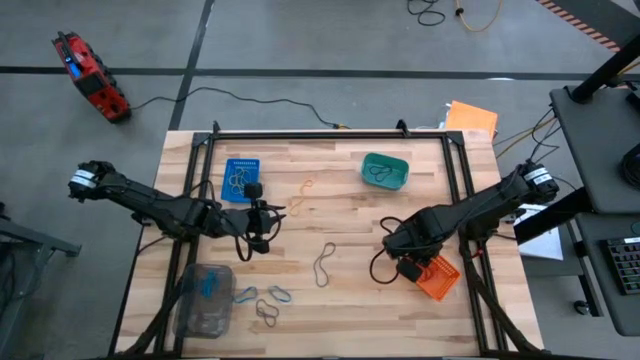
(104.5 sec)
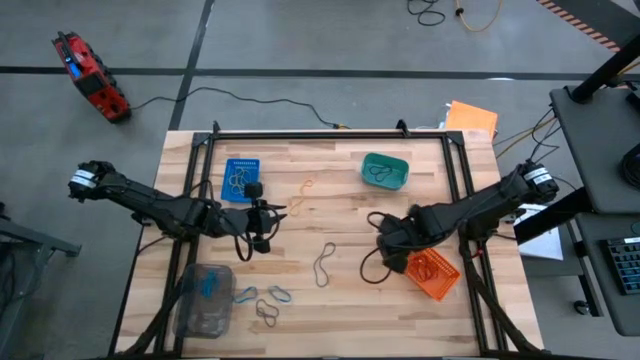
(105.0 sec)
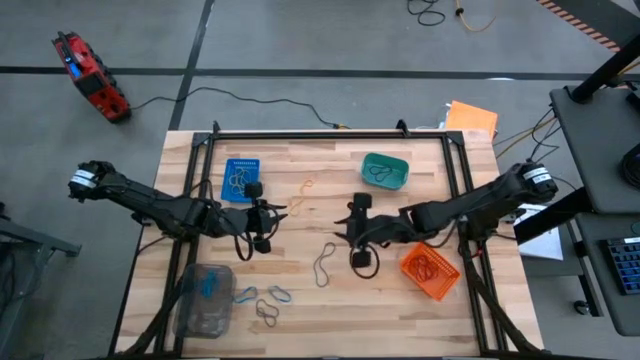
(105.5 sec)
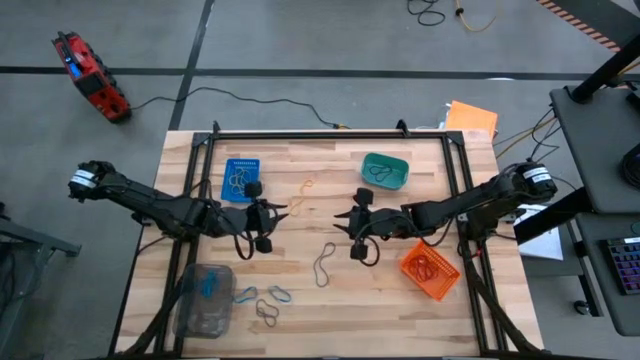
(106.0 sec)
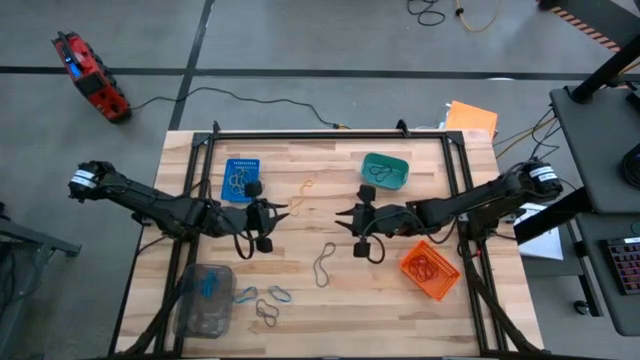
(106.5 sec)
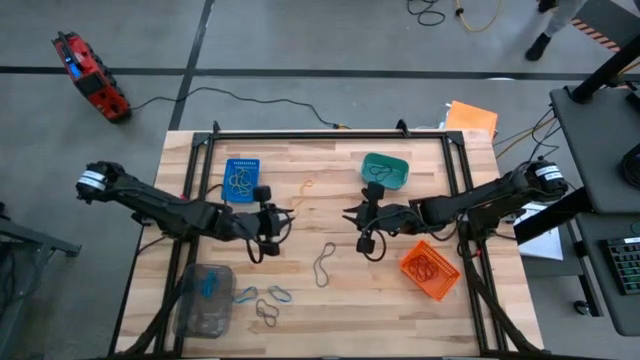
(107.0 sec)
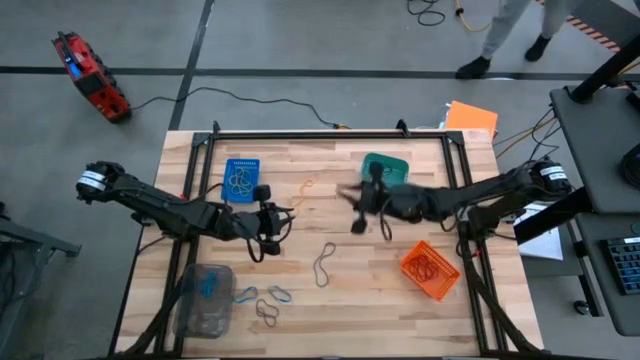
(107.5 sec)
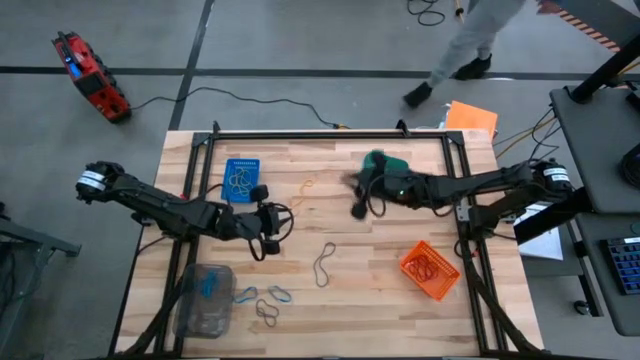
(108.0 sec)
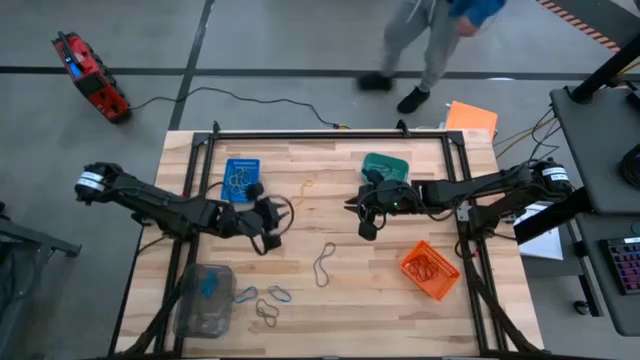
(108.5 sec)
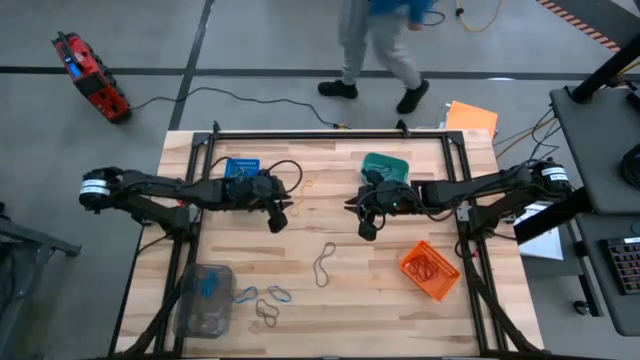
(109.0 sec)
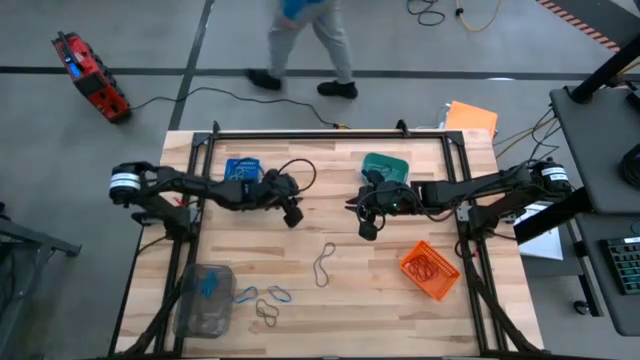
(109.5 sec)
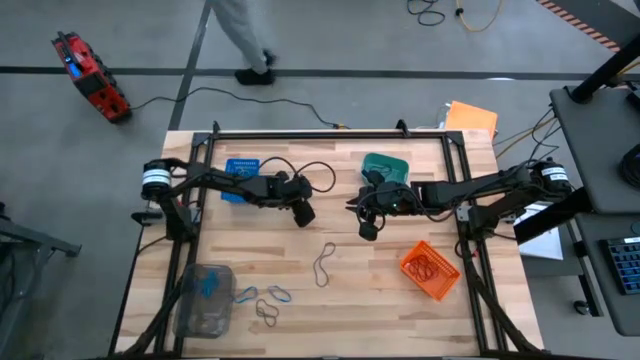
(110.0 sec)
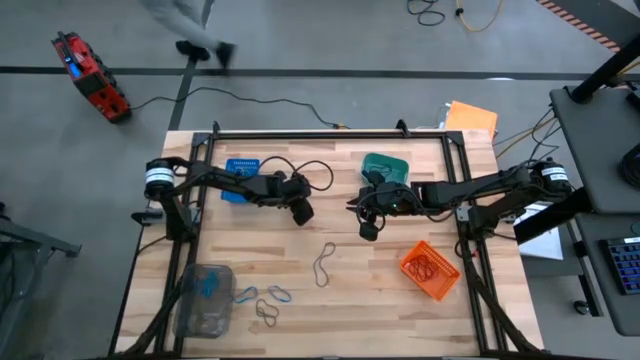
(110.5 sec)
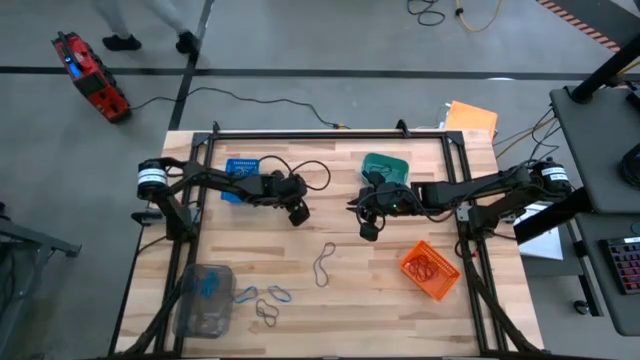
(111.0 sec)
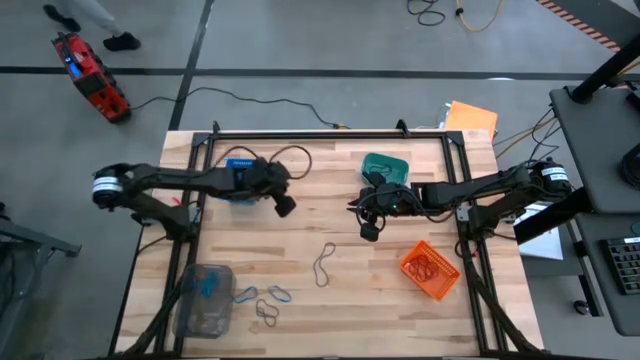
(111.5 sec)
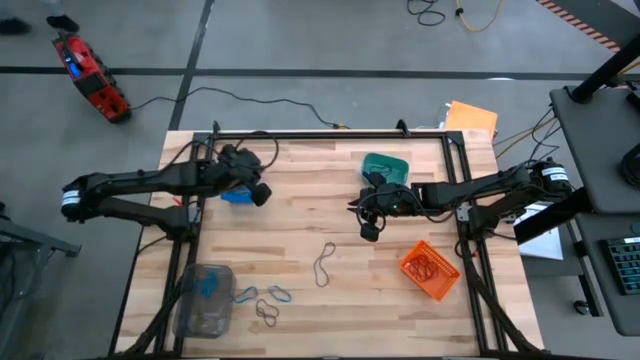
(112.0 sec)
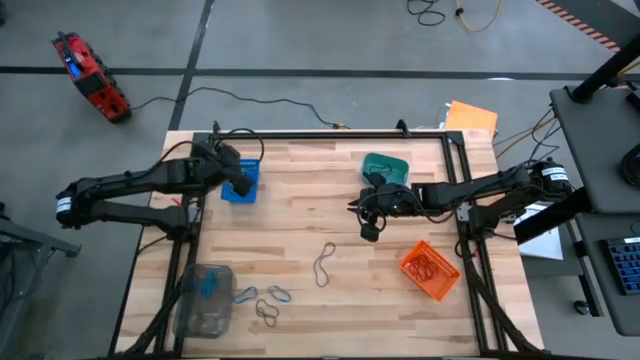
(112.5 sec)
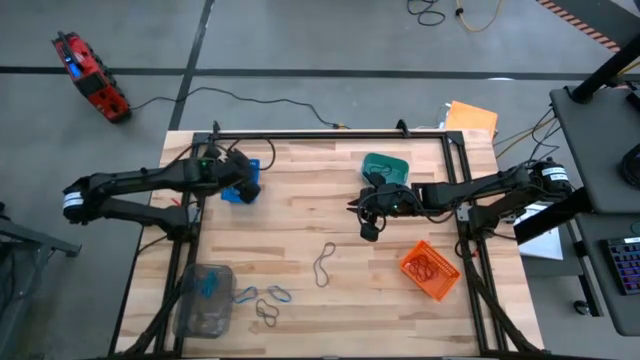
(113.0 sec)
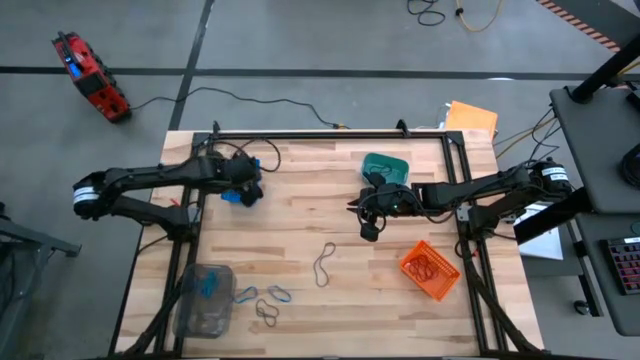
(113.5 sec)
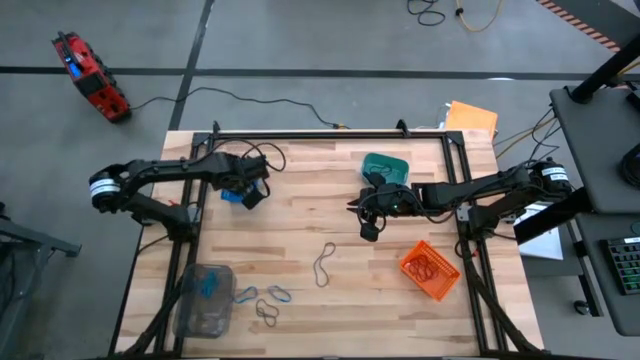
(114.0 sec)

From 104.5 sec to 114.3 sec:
Task: Sort rubber bands into baskets
Put the yellow rubberband into the blue bin

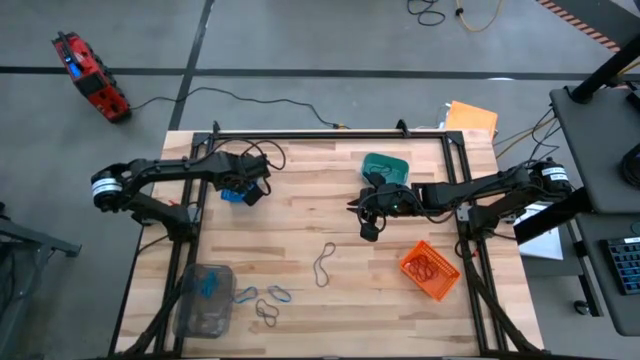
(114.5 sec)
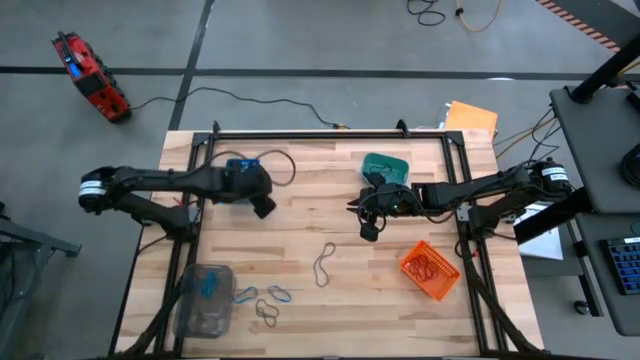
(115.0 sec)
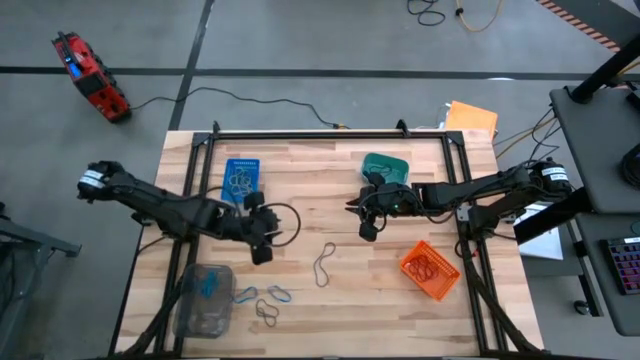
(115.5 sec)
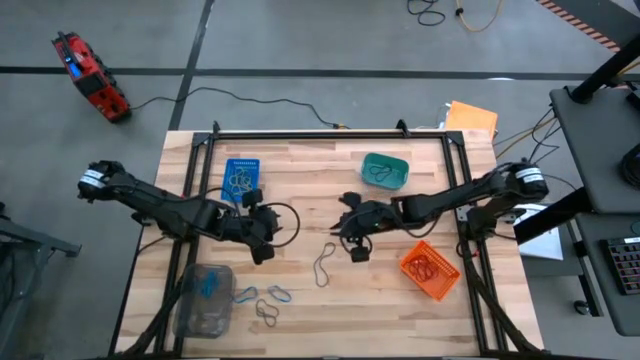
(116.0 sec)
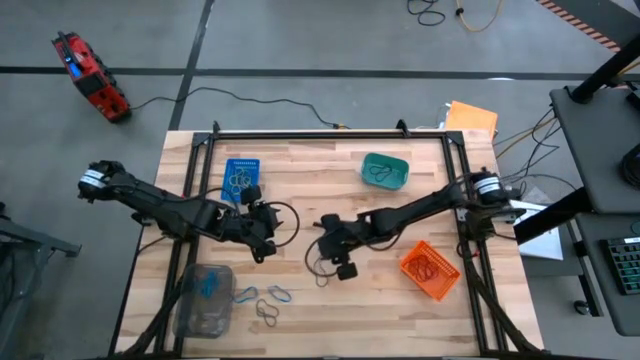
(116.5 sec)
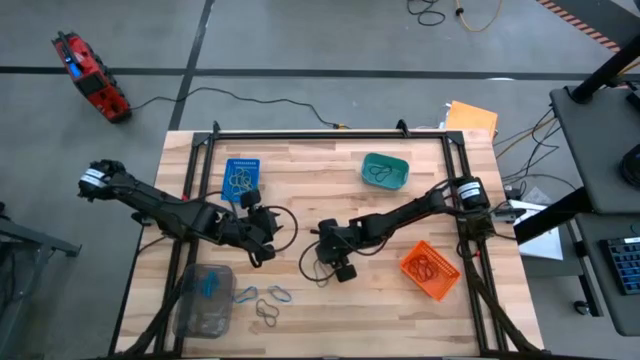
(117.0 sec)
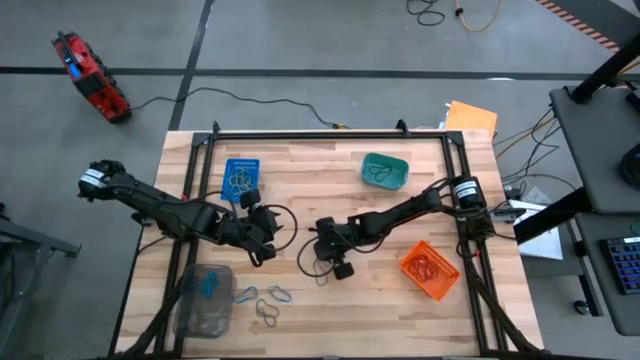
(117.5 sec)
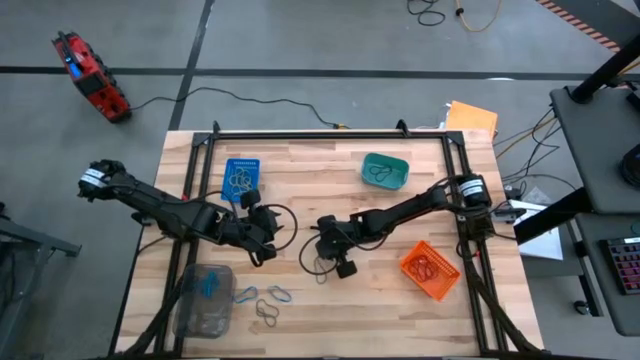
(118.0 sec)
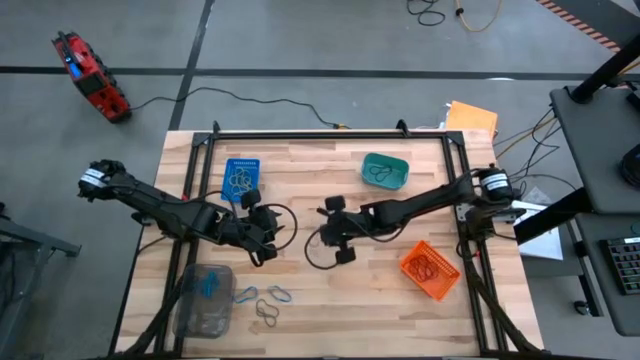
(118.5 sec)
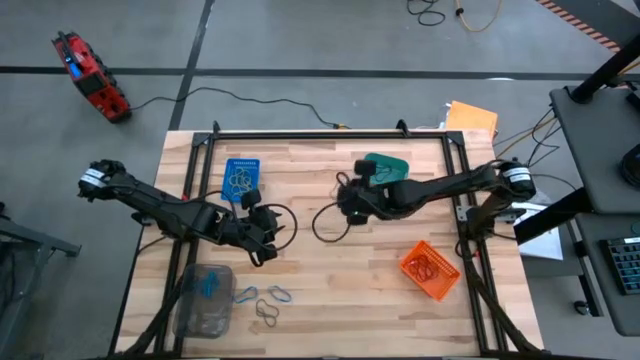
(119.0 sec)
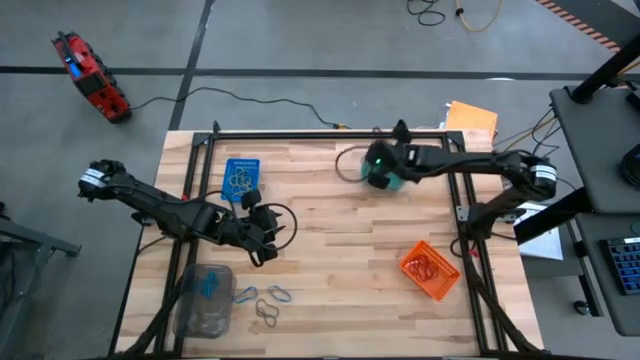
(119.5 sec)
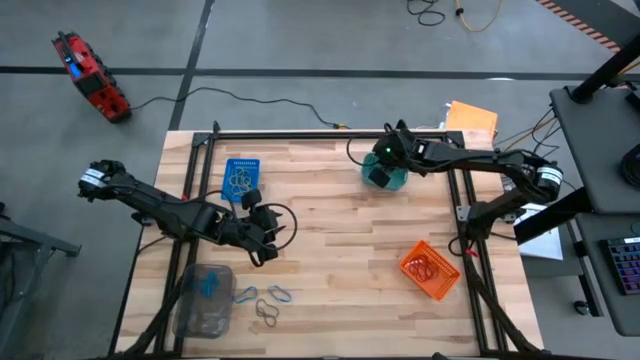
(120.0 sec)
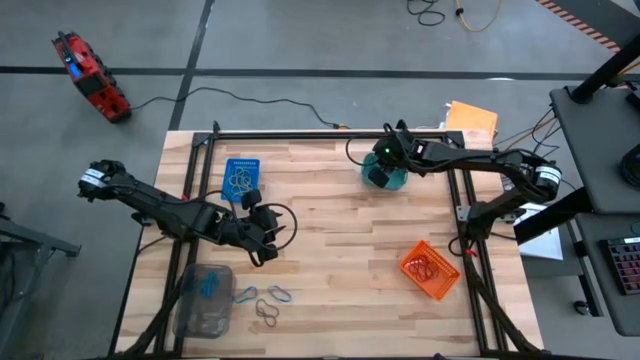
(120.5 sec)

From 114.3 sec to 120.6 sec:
Put the violet rubberband into the green bin

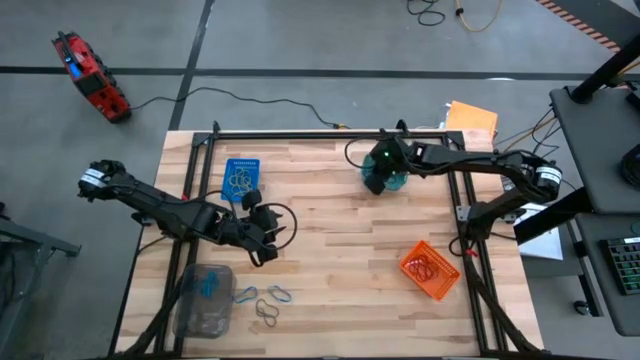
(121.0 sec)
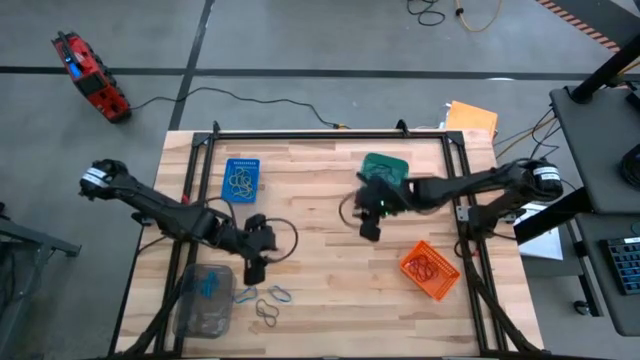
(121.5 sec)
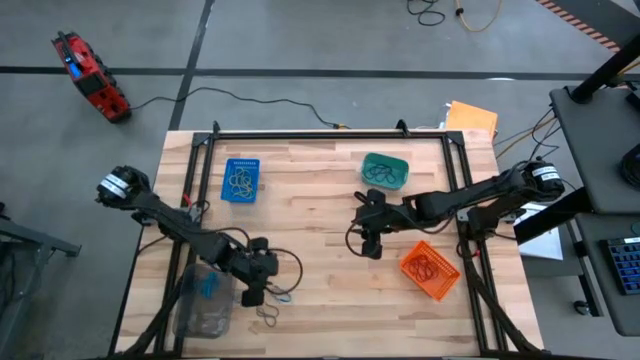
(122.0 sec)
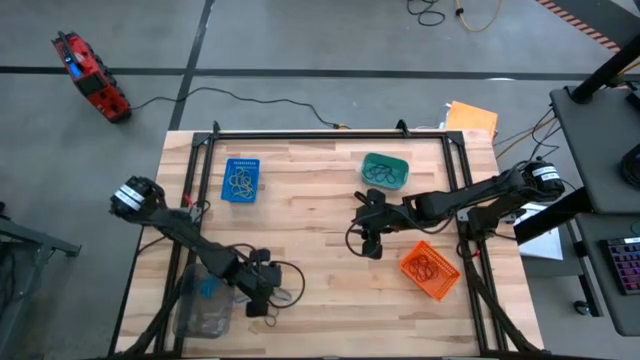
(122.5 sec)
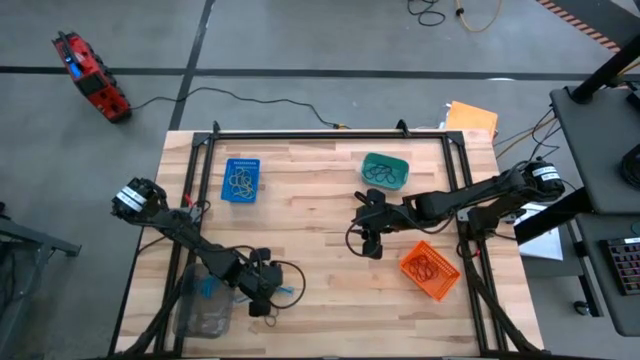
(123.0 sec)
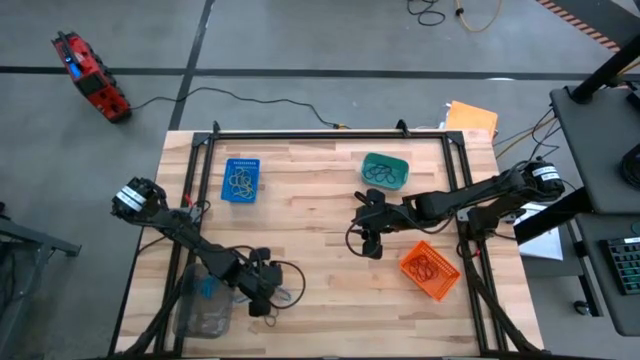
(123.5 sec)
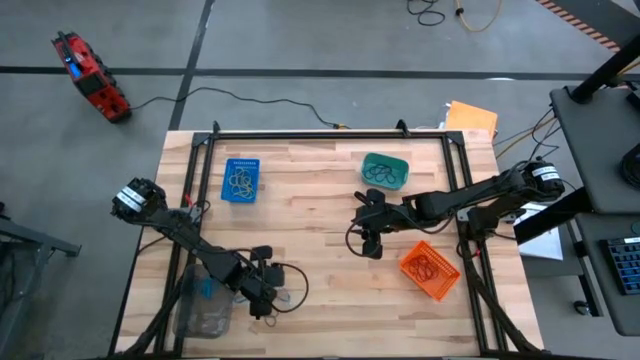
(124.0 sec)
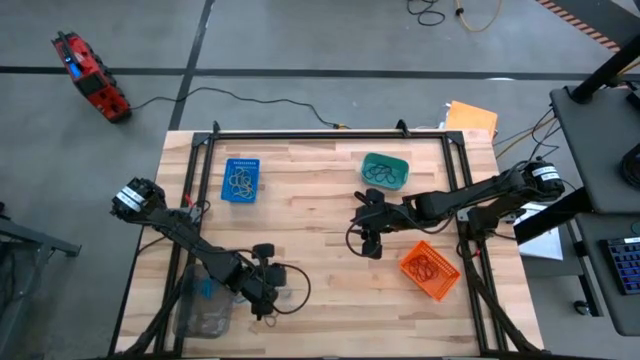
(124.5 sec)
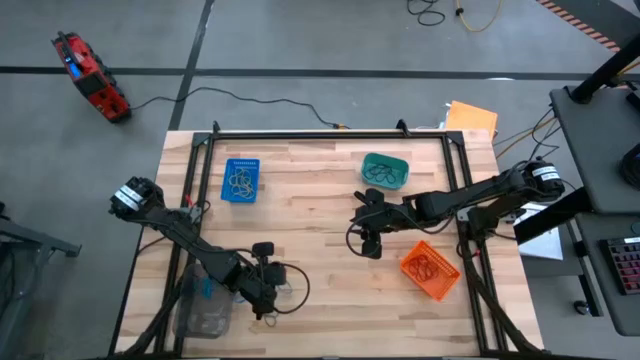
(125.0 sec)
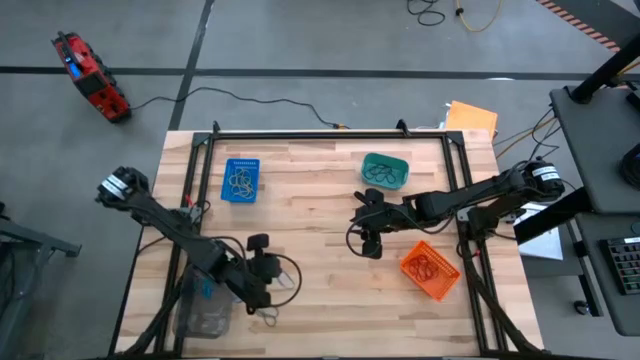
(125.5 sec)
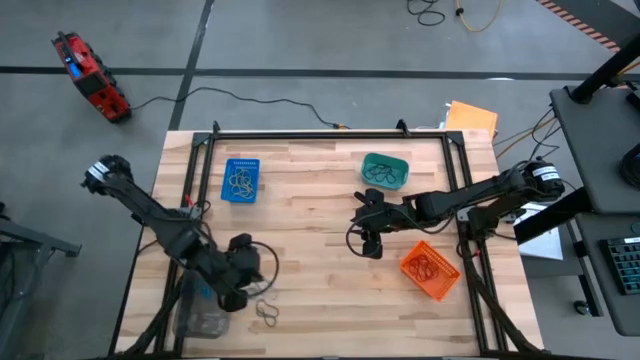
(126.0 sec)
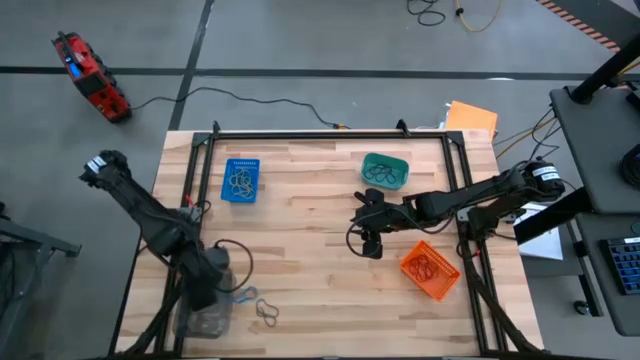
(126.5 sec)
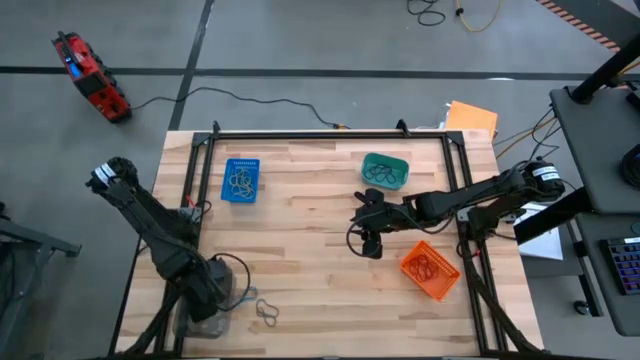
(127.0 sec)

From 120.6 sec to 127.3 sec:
Put the blue rubberband into the black bin
